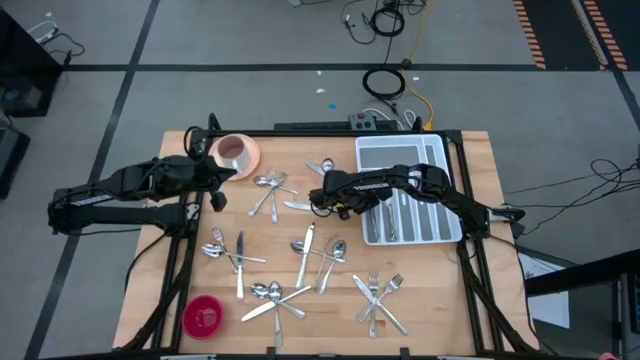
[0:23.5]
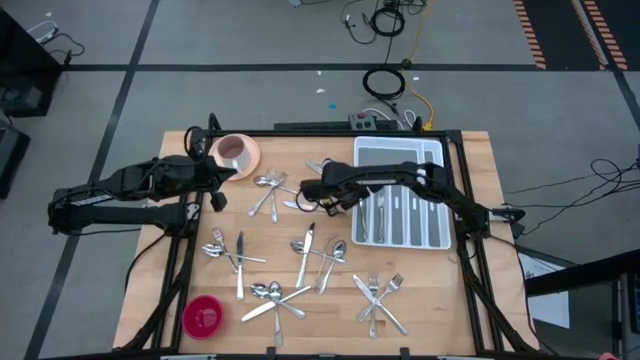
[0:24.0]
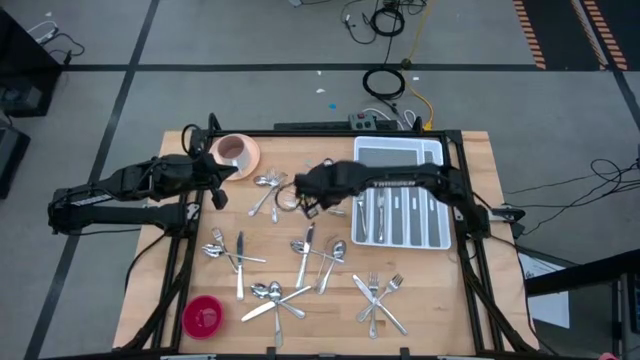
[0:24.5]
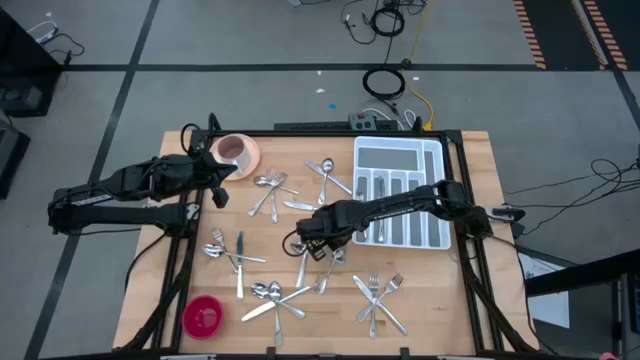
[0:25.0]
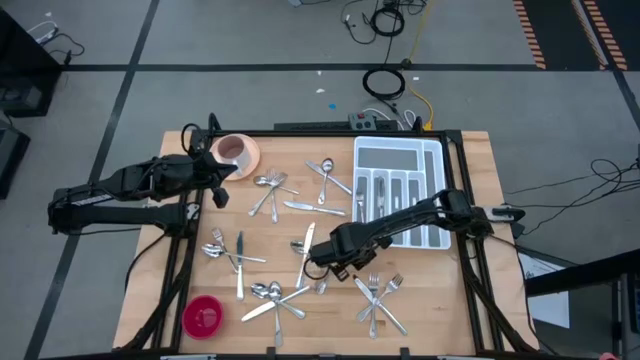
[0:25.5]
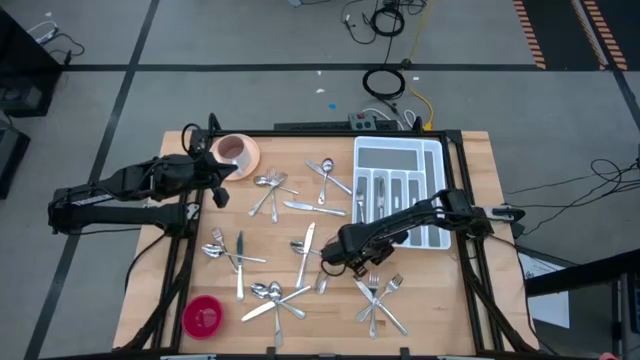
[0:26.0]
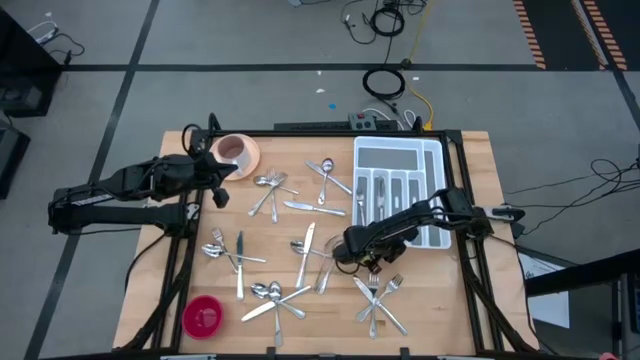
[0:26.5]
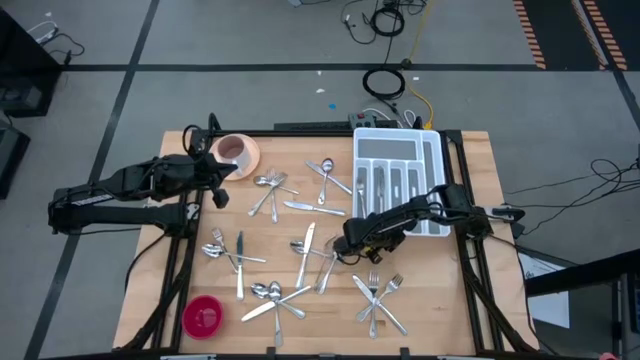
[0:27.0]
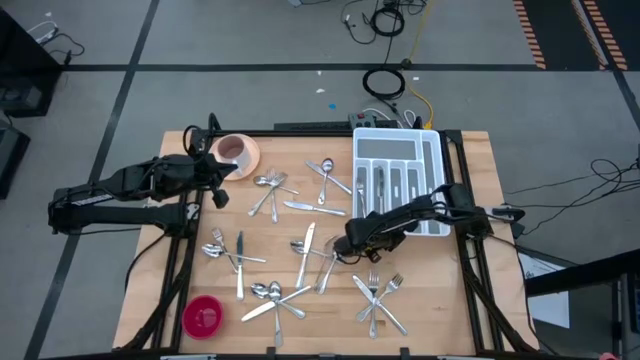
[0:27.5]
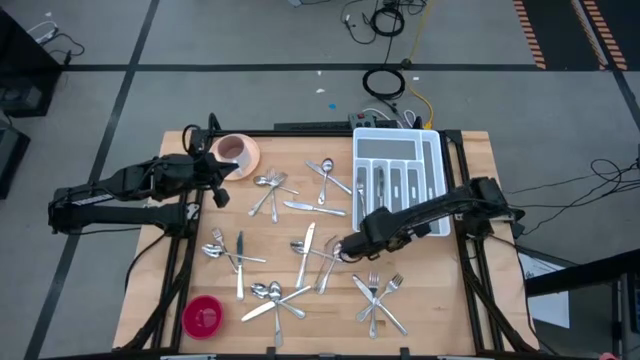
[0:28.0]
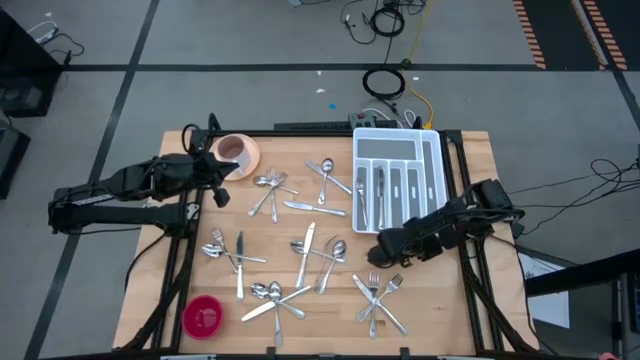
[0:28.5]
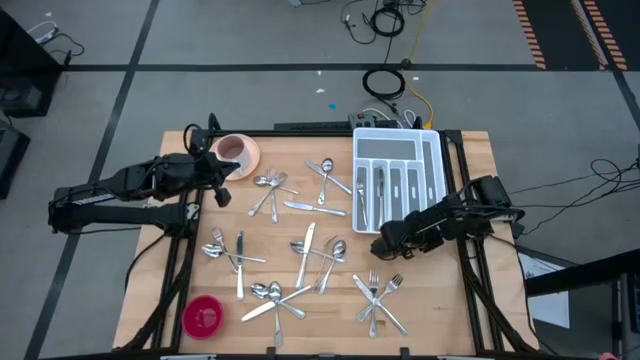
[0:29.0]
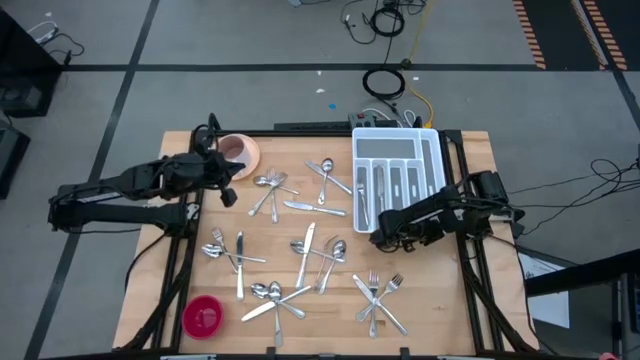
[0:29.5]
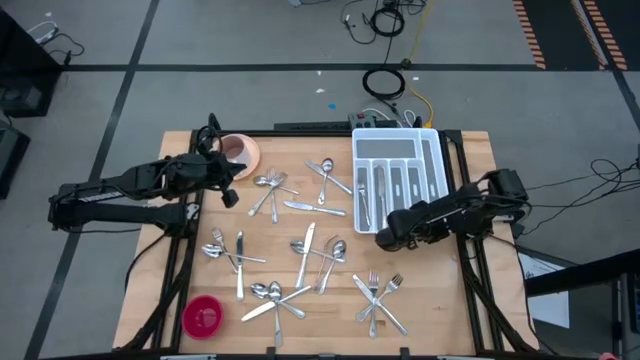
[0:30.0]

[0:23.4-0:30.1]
Task: Sort silverware
Adjust the white silverware tray

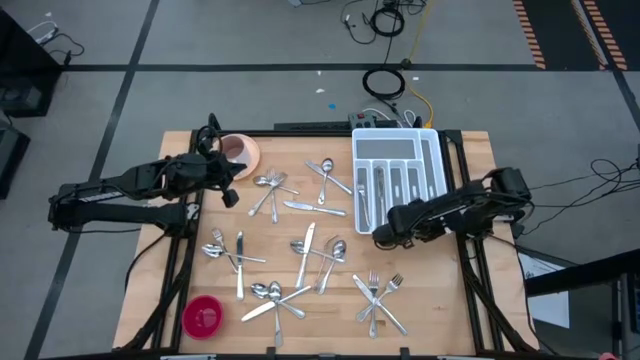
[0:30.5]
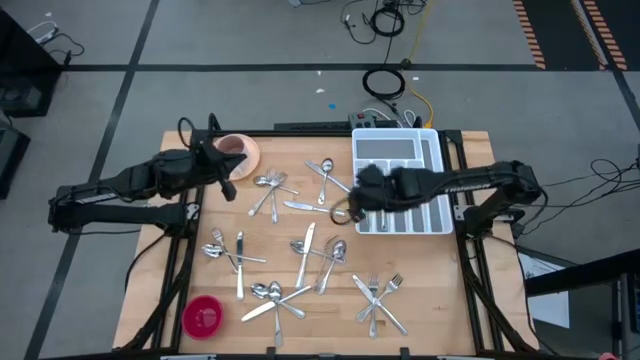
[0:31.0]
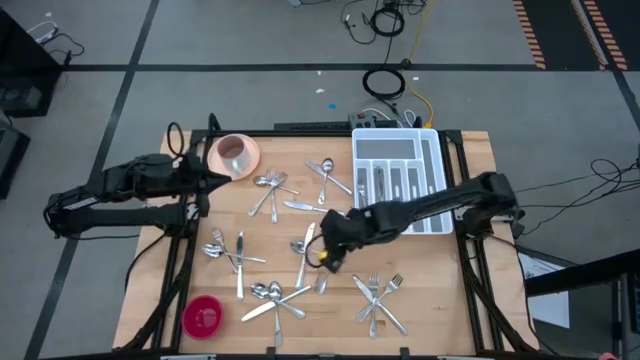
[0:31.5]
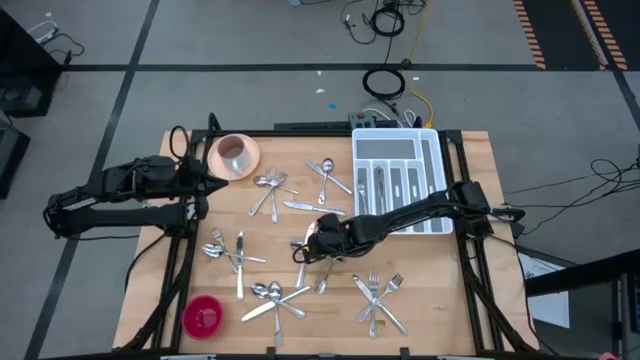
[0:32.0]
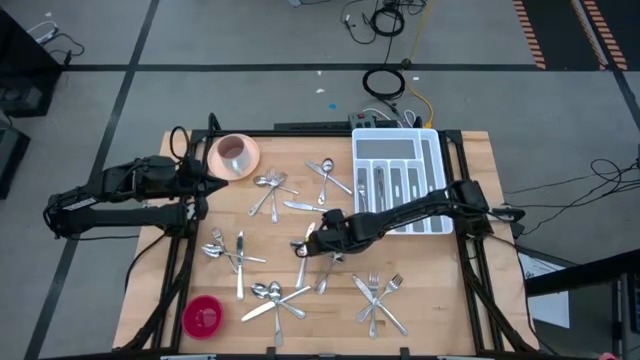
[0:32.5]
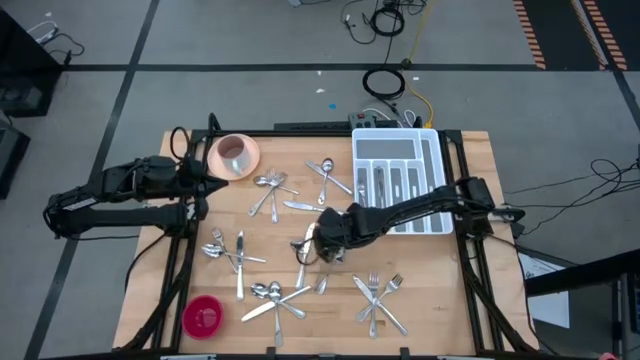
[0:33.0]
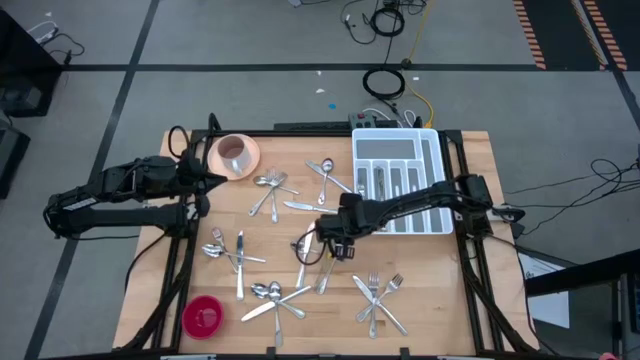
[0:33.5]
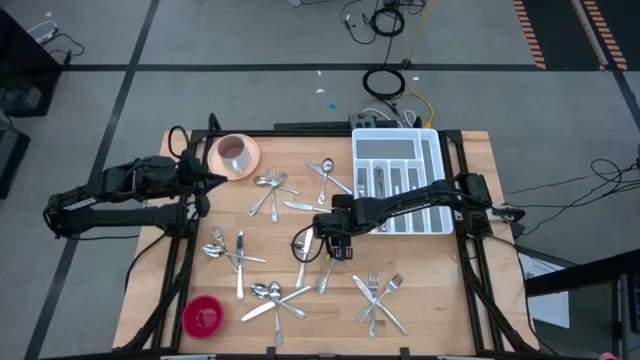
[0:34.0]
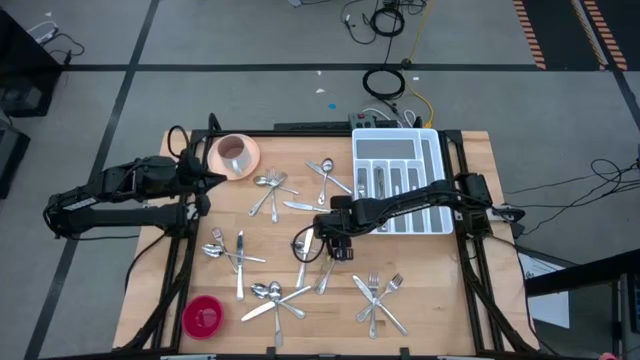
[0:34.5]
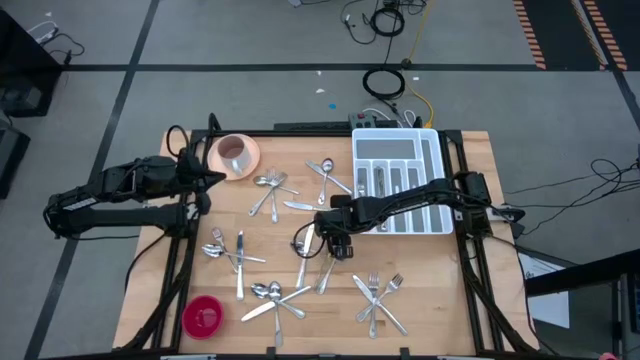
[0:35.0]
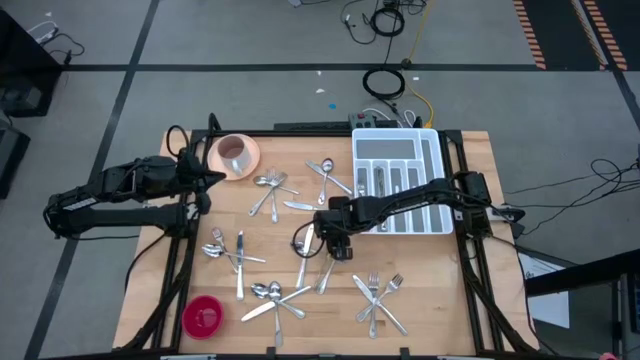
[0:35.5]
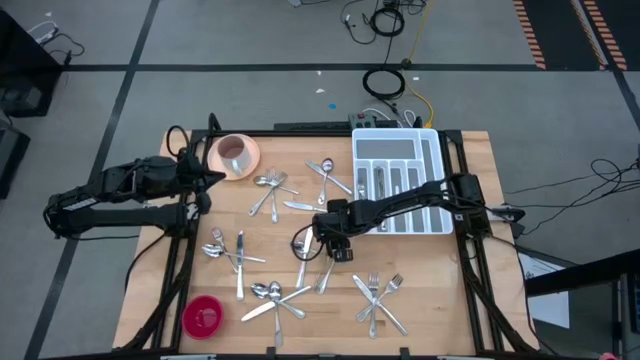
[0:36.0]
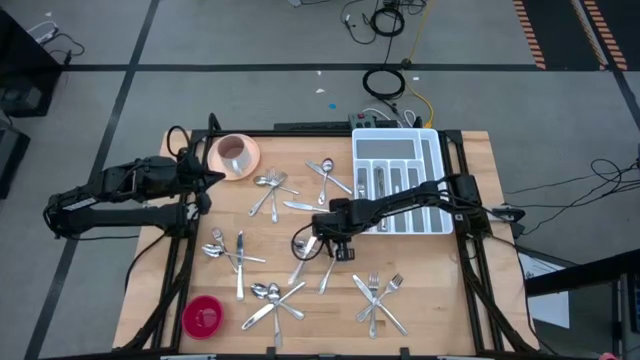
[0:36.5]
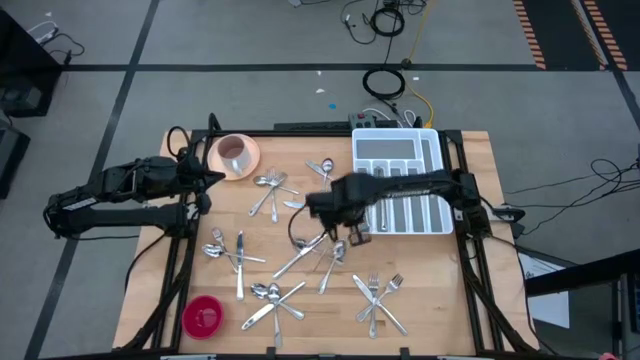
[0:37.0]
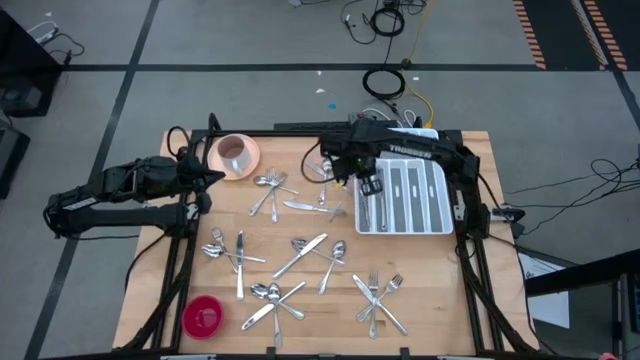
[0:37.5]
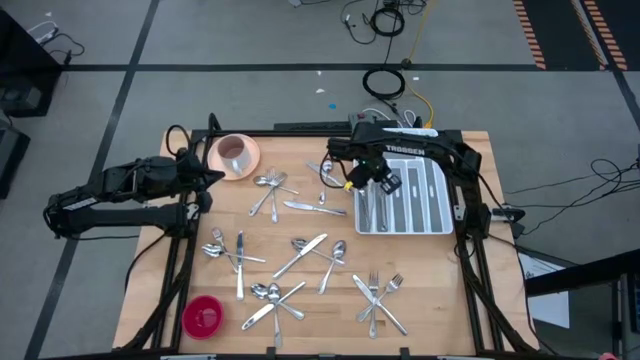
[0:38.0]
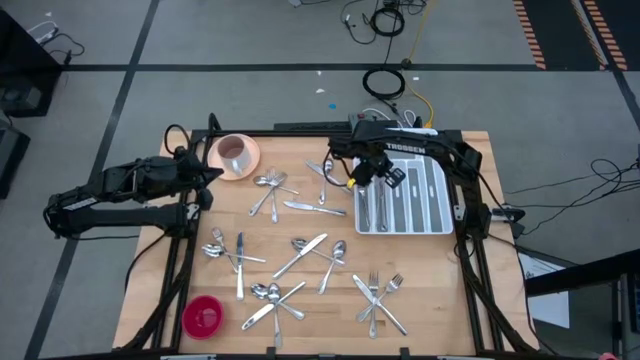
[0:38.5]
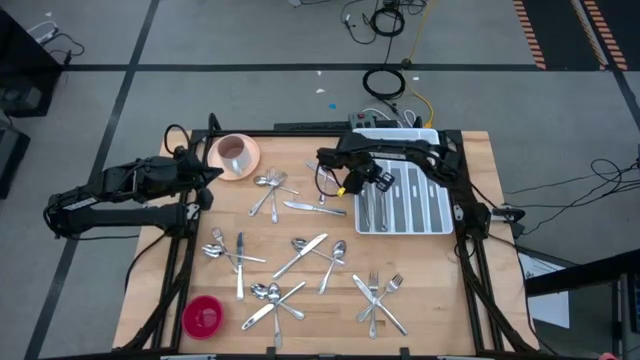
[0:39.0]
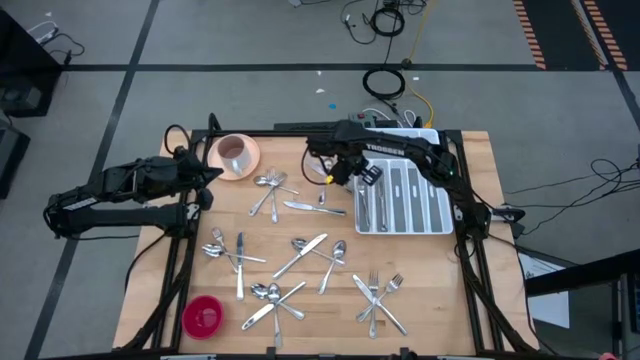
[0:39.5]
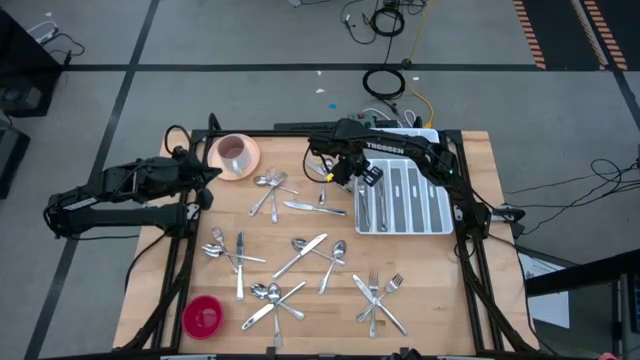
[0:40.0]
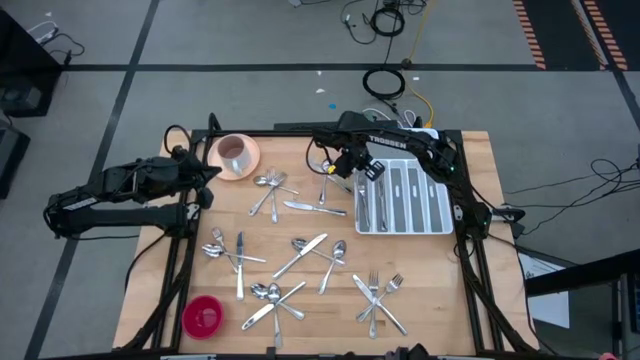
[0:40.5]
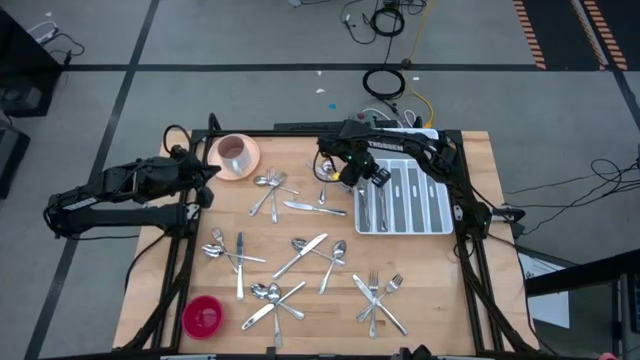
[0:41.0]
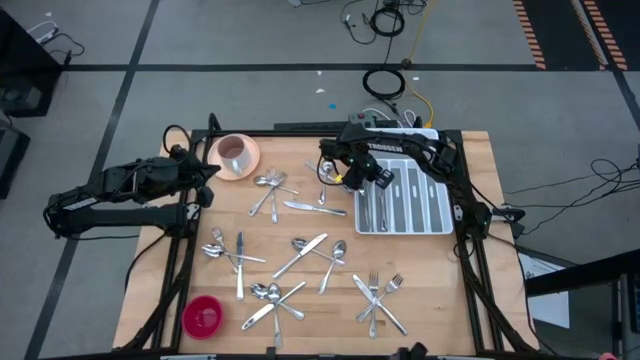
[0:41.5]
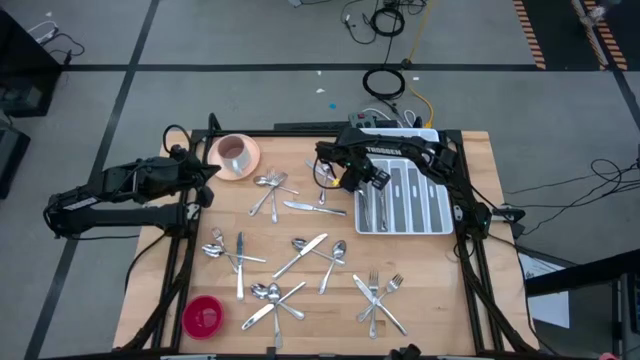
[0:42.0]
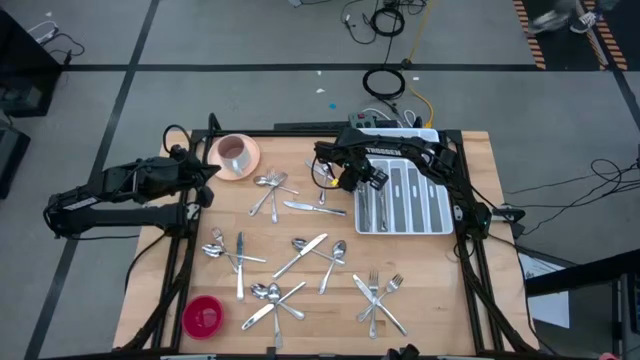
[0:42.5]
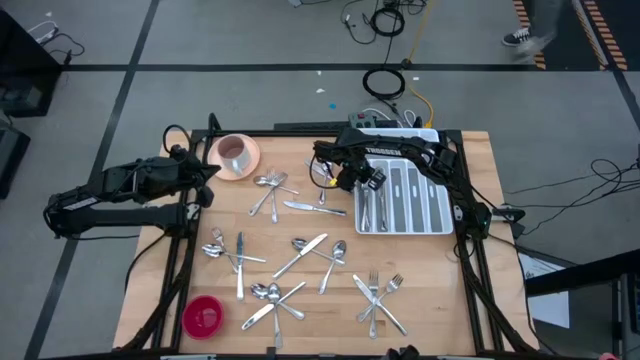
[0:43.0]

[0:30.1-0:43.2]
Put the silver fork into the white silverware tray

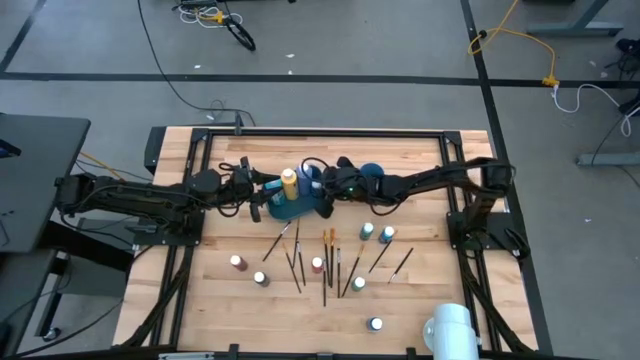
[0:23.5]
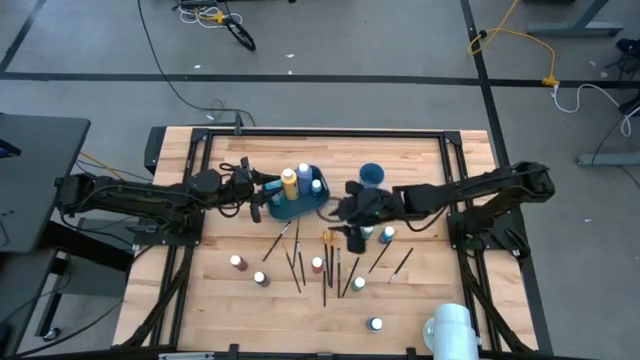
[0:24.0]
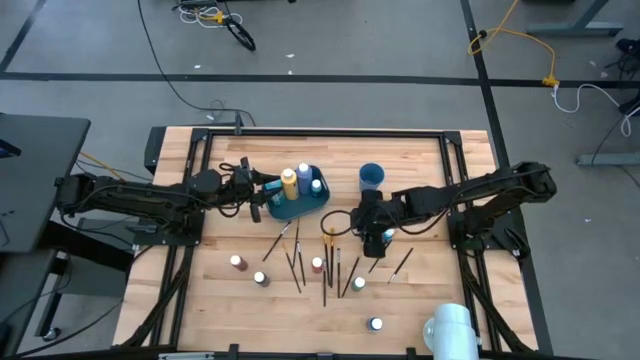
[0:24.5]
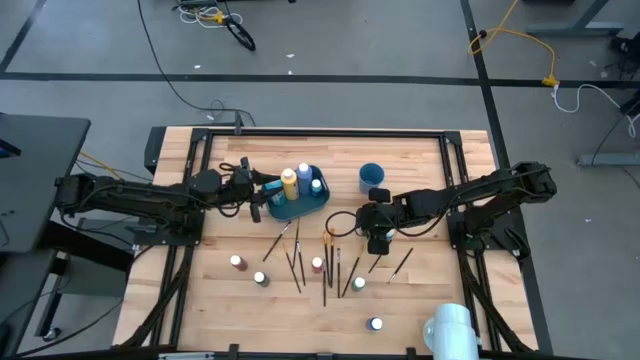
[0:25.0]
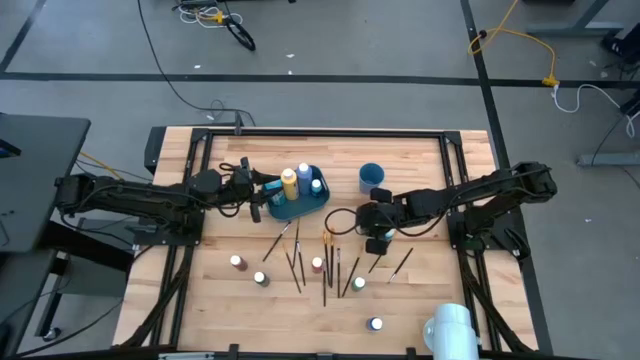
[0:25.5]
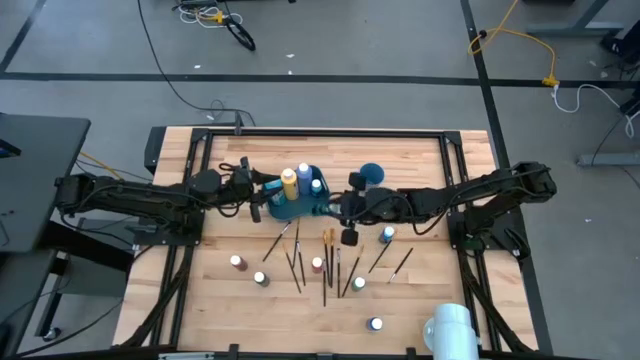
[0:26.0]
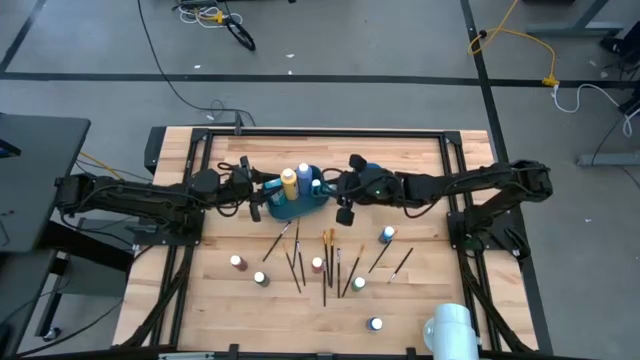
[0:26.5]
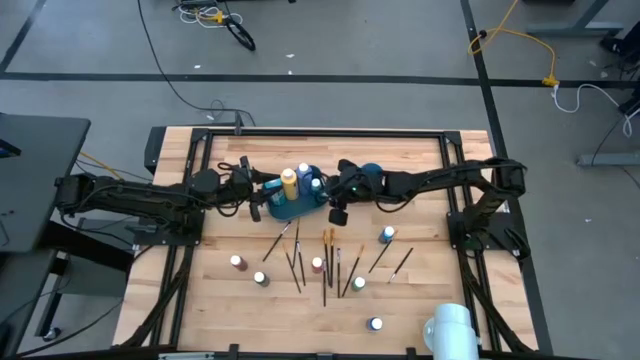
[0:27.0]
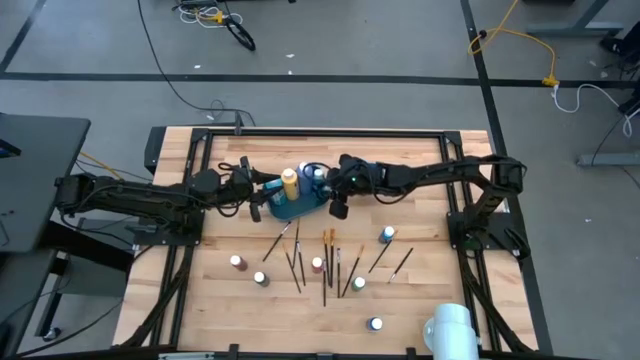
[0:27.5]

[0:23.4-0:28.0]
Task: Pick & Place Paint Supplies
Put the small light blue paint bottle into the blue bin
